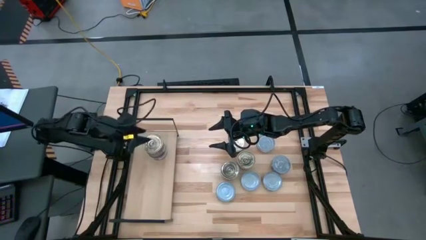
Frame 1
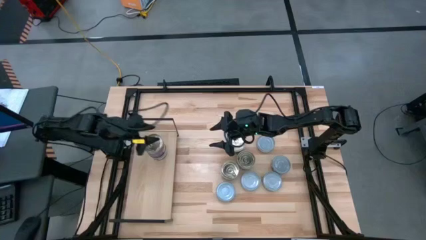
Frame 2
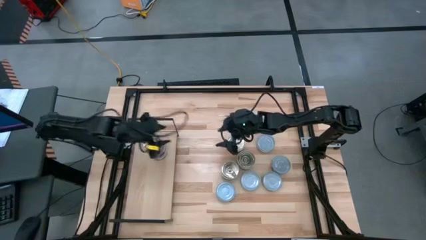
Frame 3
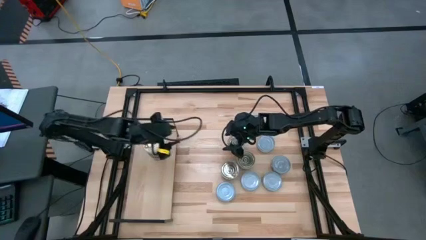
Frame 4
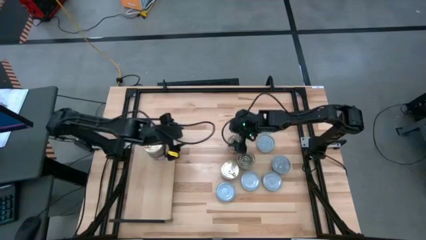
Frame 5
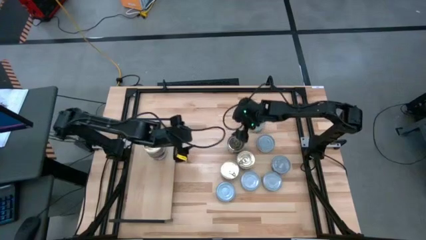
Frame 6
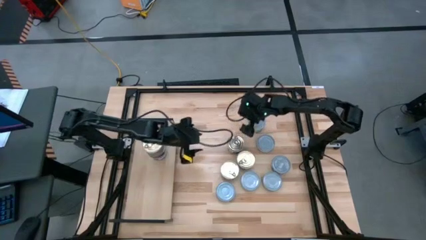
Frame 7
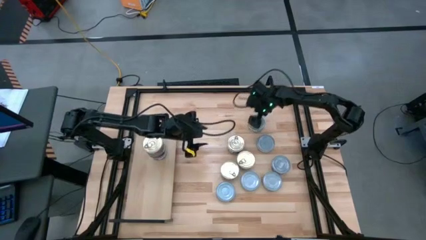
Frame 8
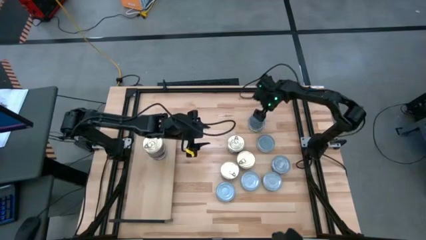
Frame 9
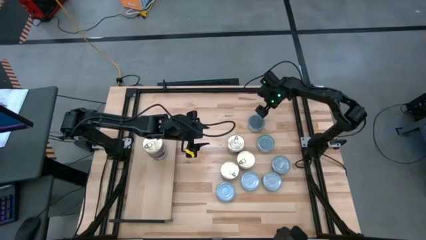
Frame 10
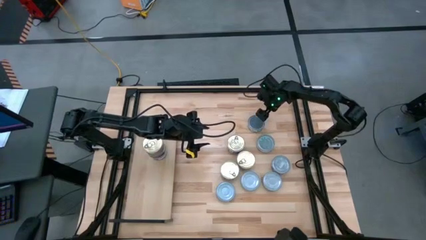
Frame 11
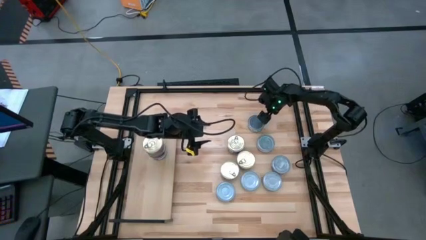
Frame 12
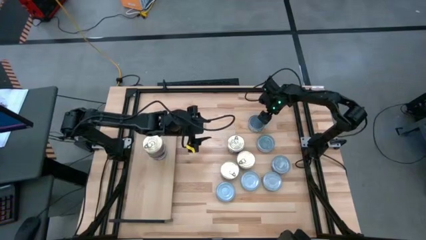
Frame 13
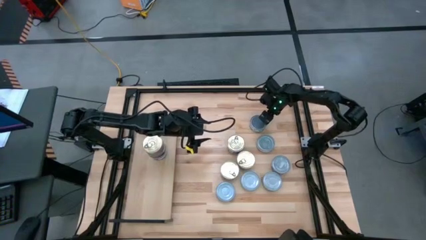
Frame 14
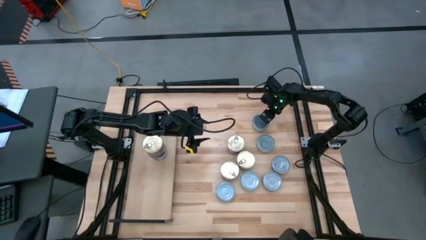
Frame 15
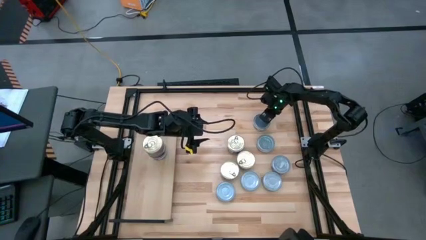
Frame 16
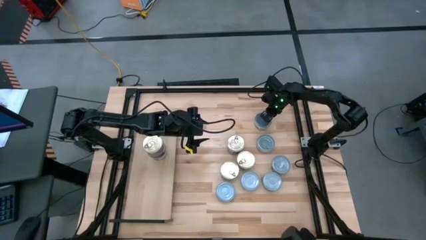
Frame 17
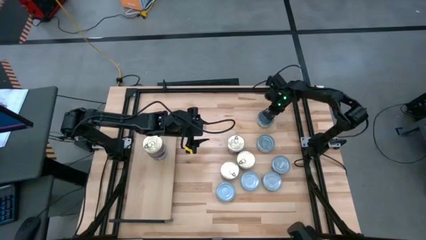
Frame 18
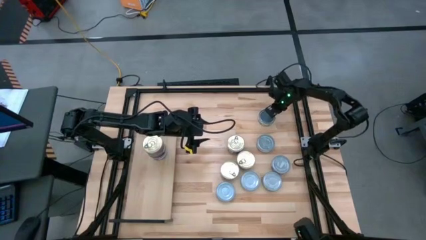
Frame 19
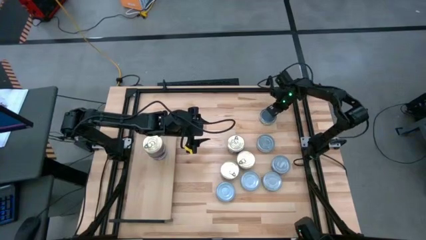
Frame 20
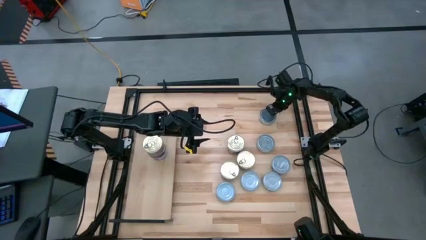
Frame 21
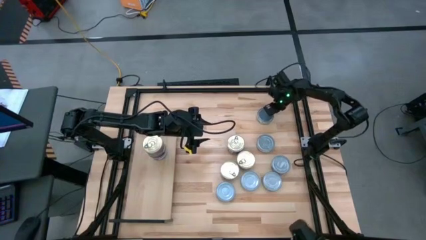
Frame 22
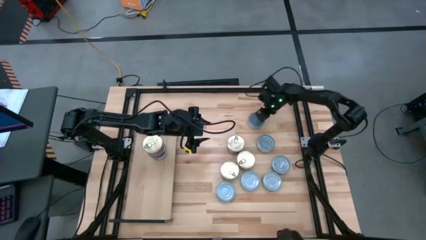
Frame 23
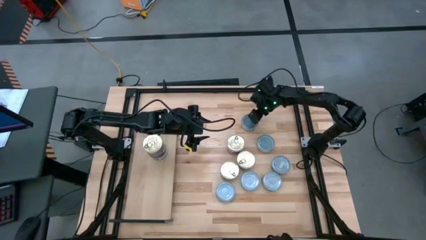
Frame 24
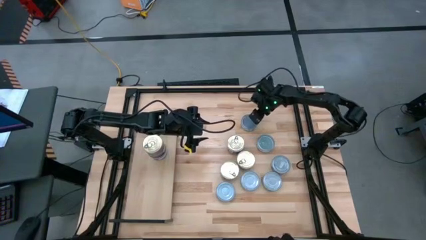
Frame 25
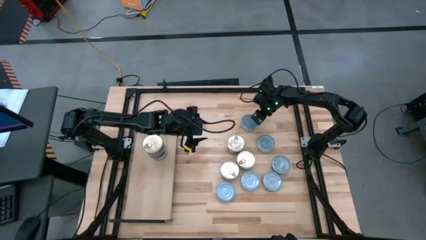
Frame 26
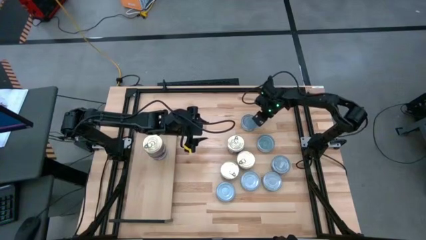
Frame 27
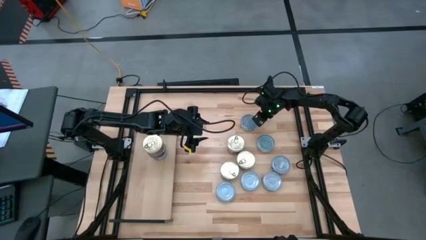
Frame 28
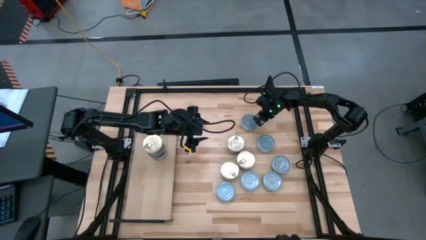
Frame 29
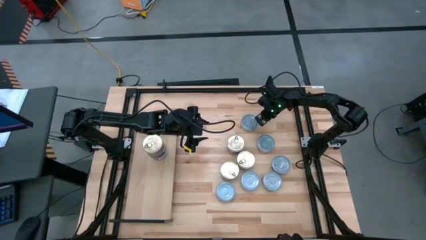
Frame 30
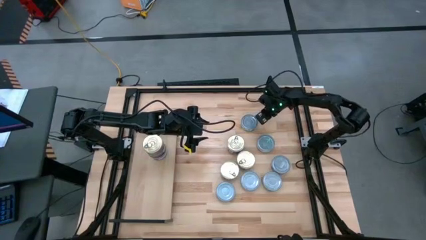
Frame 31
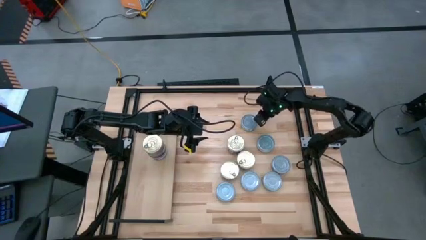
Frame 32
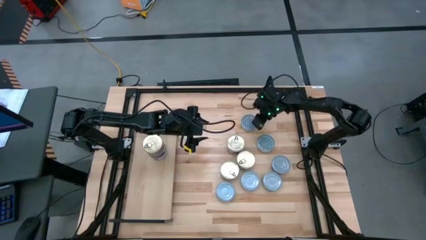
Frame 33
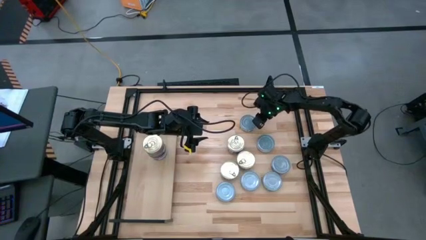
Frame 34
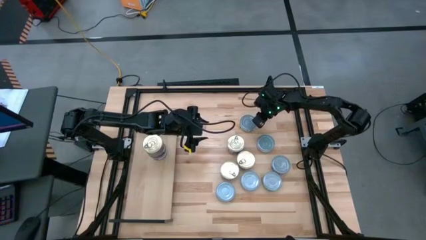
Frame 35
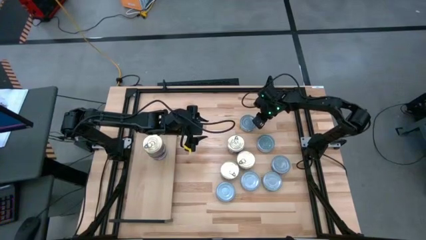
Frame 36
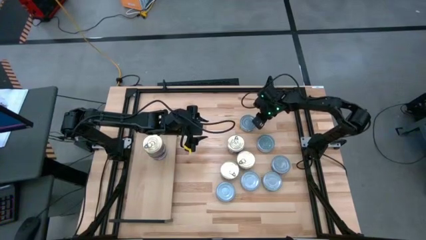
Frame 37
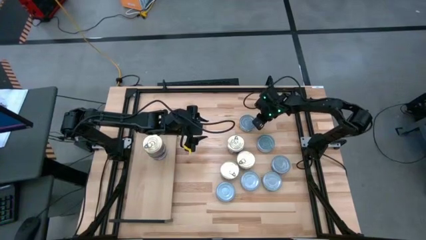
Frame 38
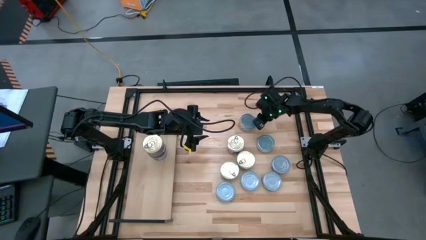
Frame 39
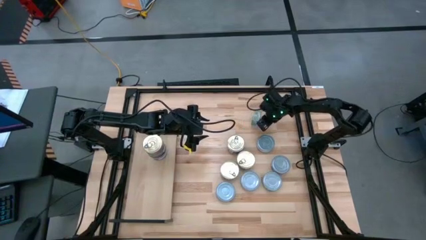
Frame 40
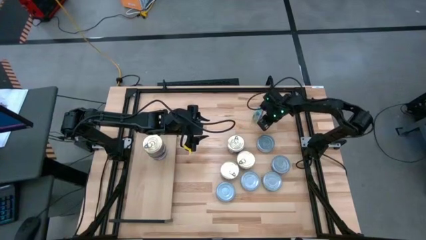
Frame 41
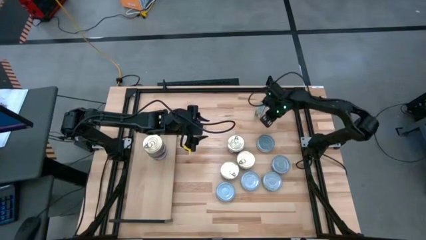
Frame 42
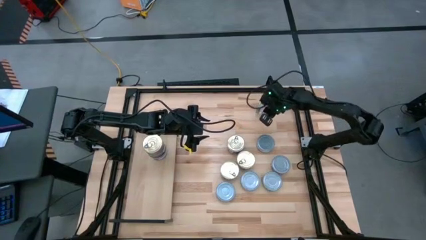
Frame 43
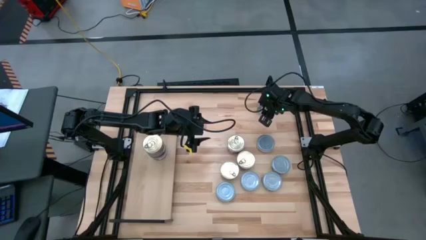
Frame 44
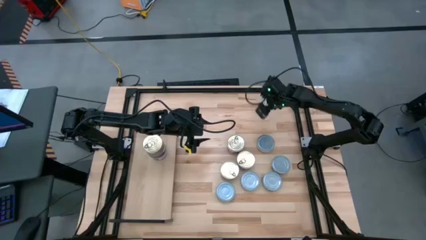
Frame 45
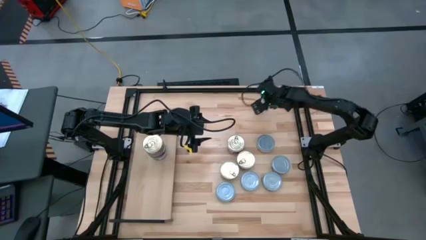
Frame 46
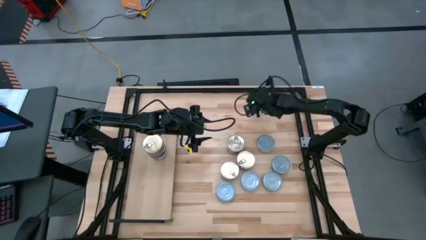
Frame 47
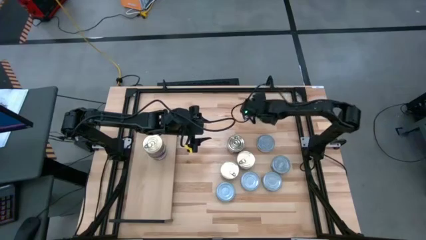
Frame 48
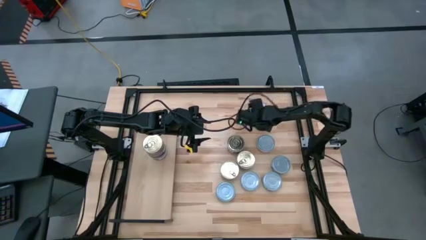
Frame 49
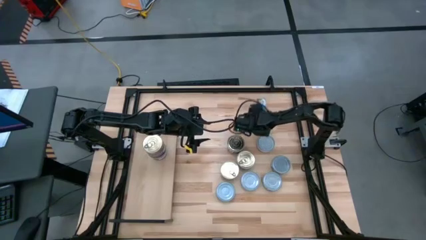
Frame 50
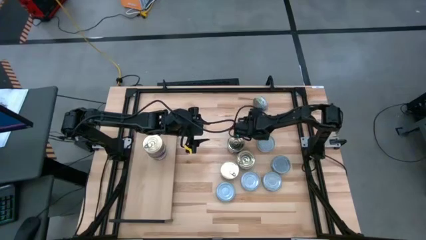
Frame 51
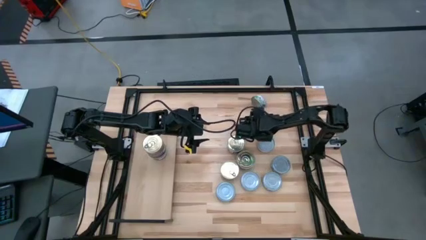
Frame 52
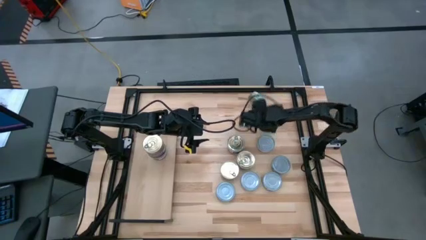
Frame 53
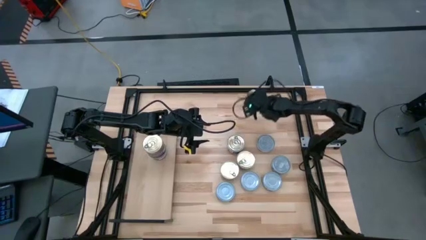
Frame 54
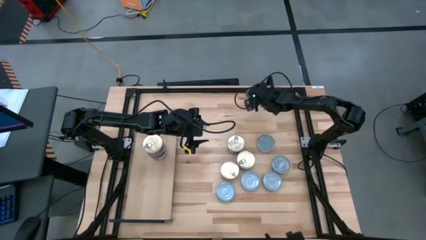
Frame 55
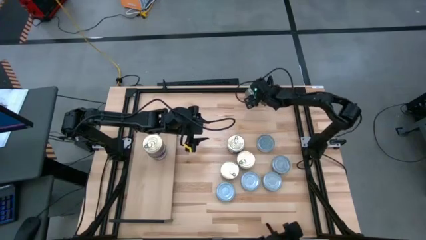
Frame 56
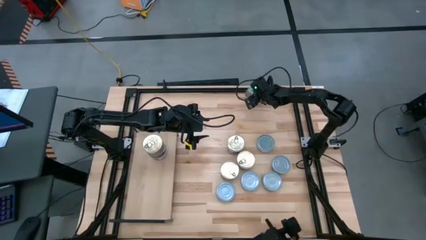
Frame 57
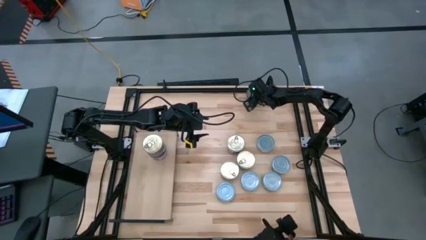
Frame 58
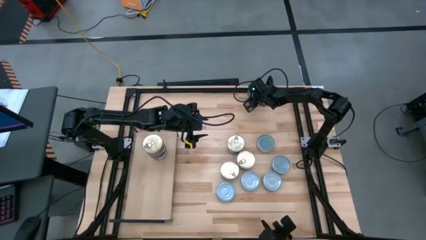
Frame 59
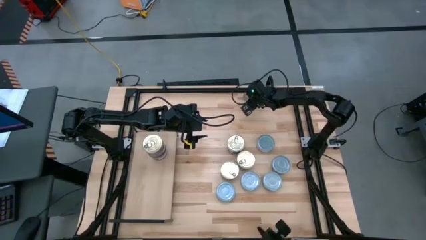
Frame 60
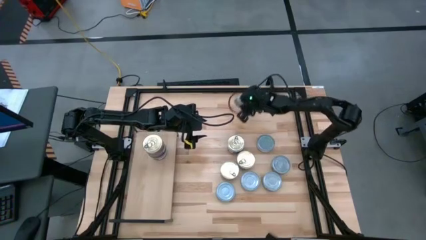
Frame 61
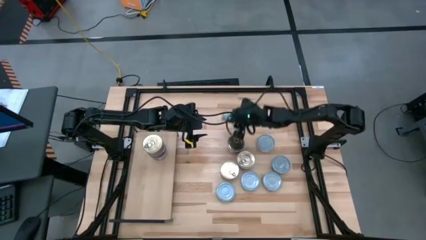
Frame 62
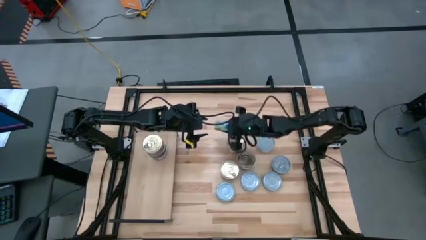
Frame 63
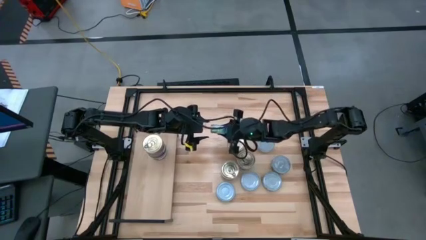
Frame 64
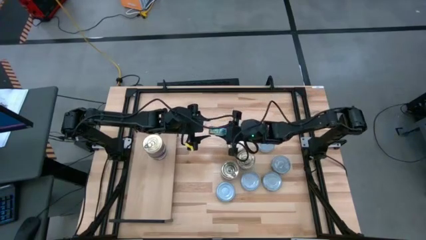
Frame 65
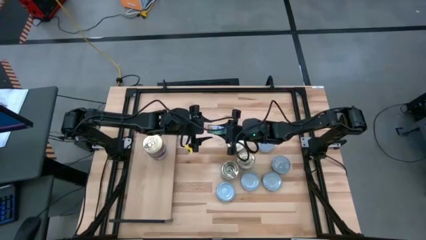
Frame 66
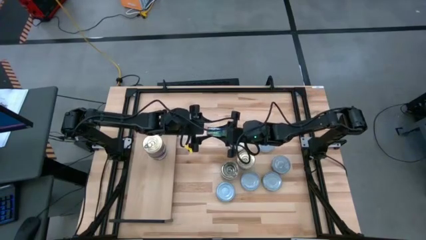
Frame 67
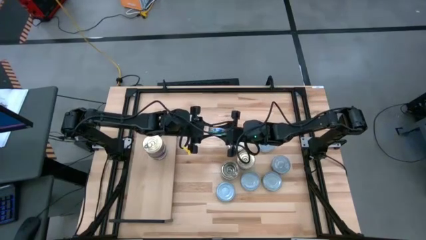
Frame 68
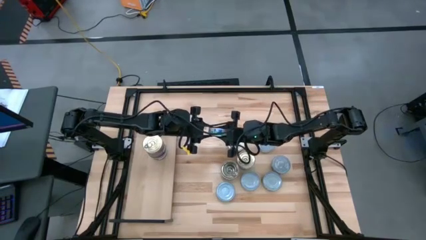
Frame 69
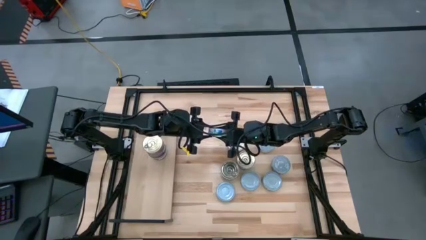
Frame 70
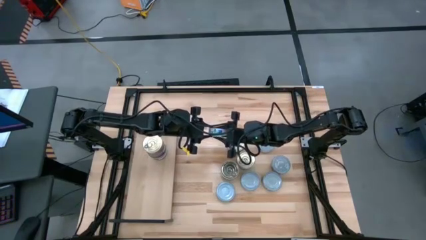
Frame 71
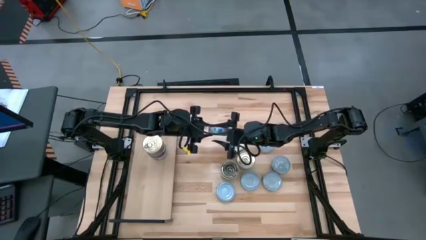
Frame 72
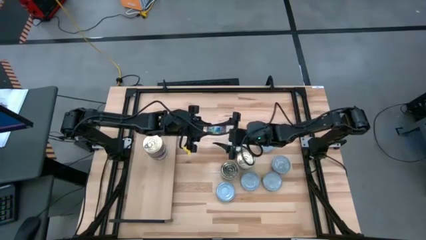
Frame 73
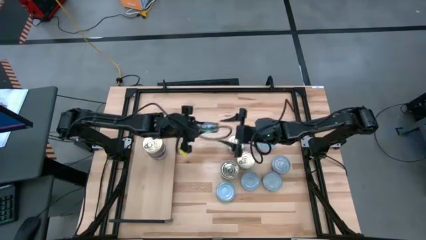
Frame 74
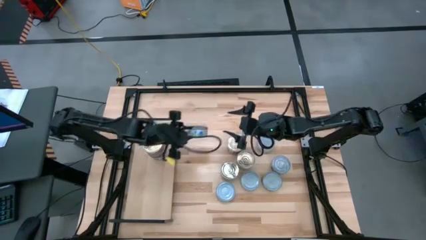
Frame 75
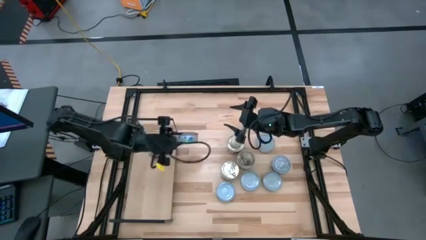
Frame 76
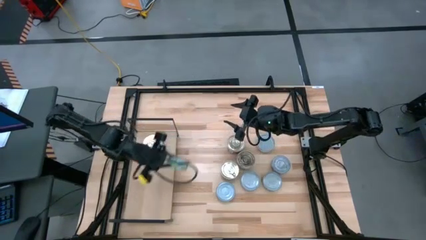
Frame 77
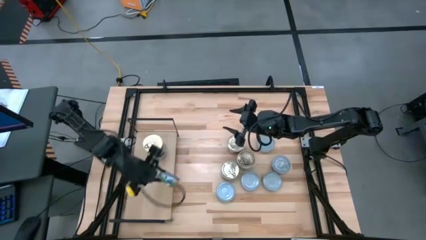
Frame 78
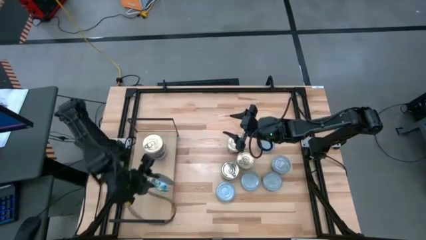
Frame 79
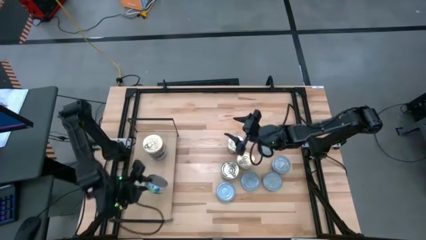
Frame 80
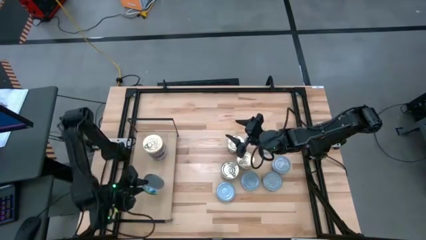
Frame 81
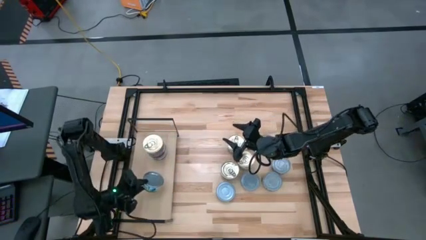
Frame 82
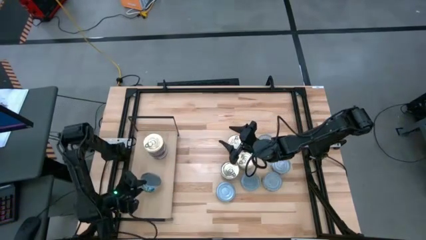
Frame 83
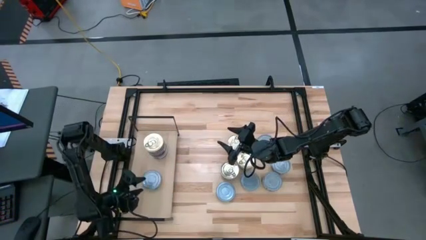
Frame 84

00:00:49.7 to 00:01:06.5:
Task: Stack canned seafood by type on shelf
Put the green and white tuna can on the shelf
